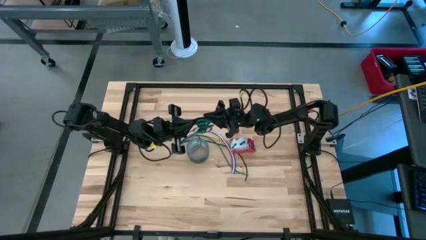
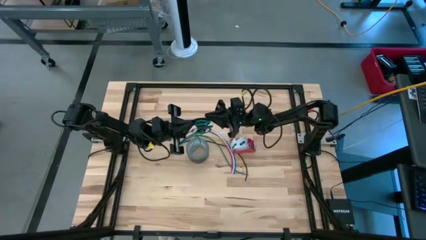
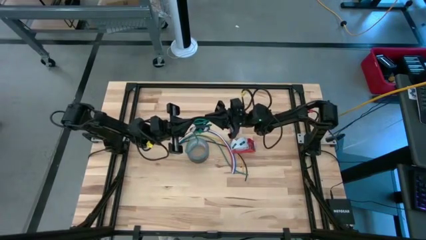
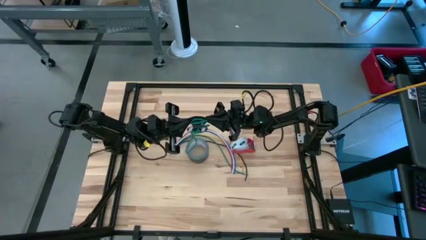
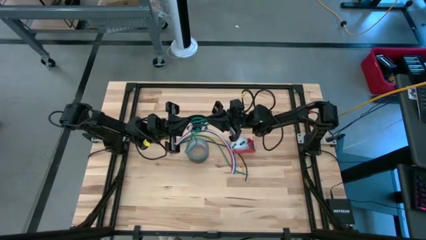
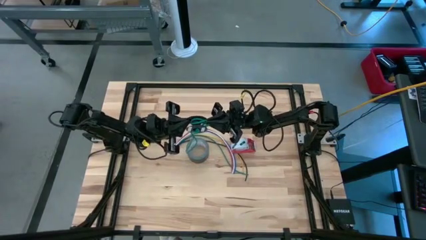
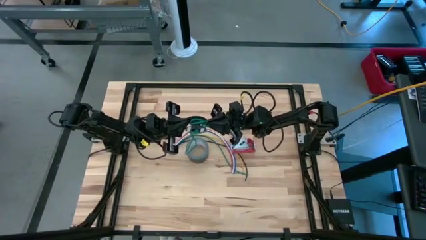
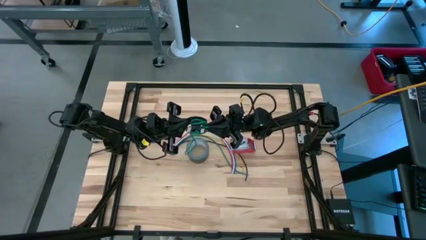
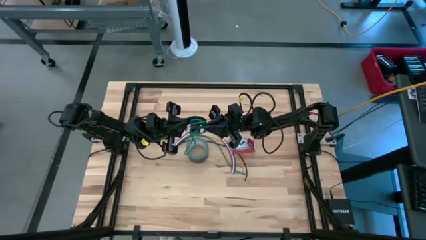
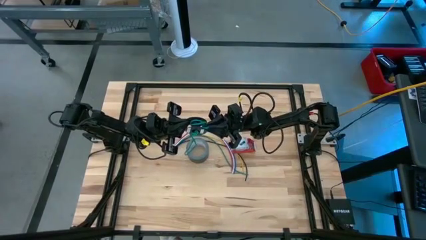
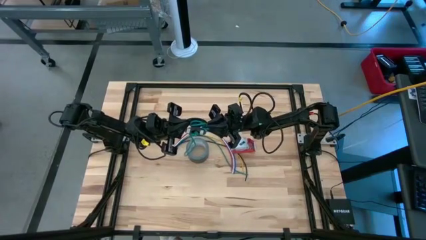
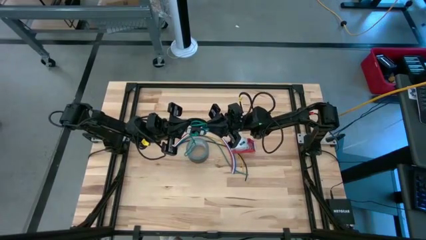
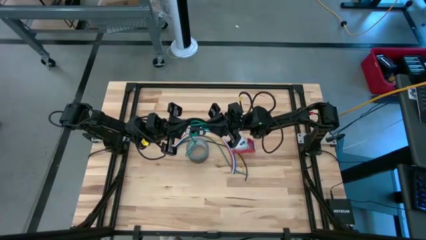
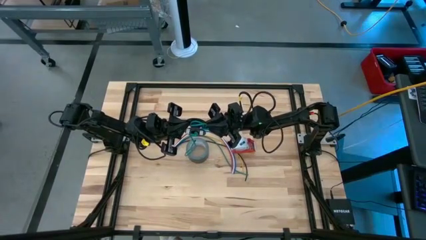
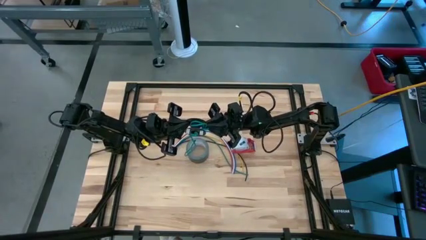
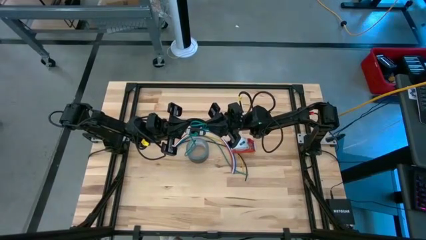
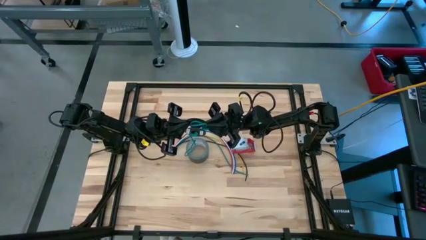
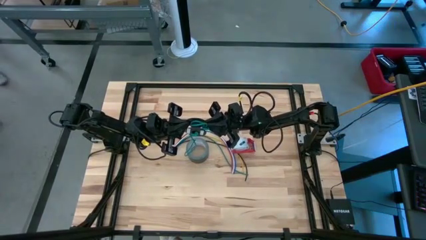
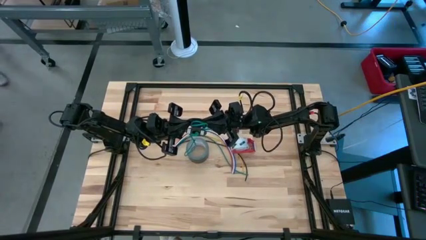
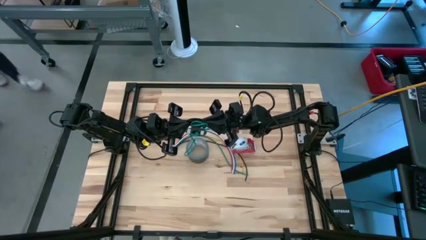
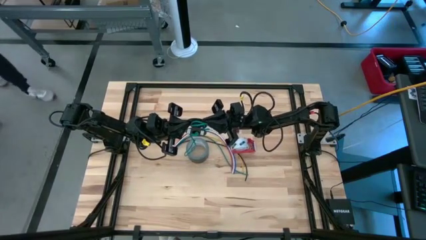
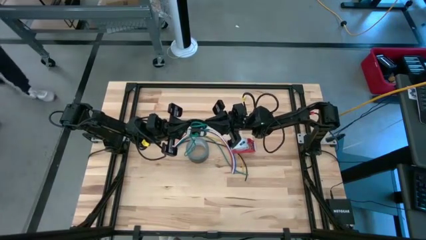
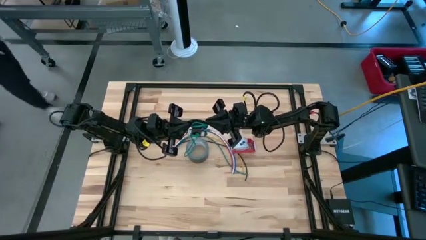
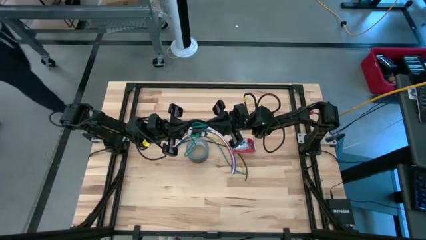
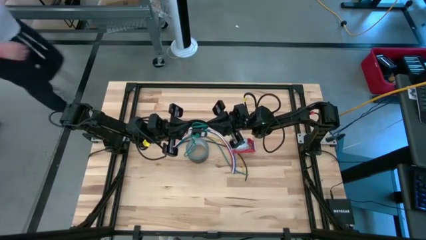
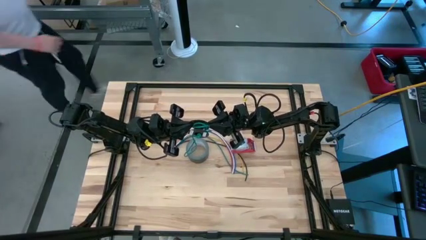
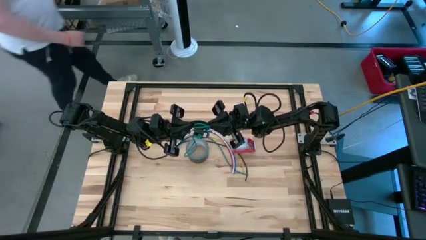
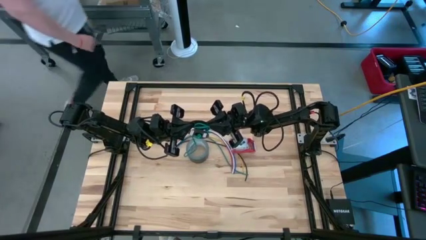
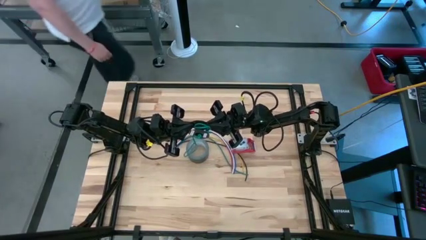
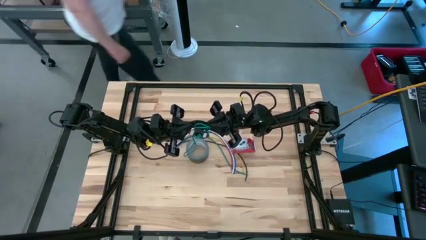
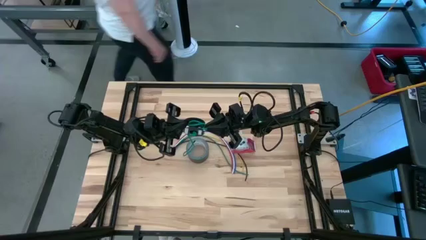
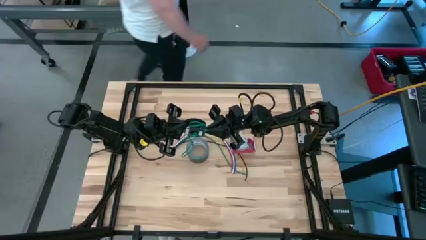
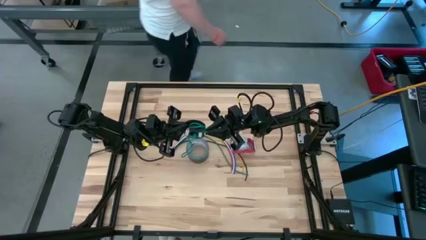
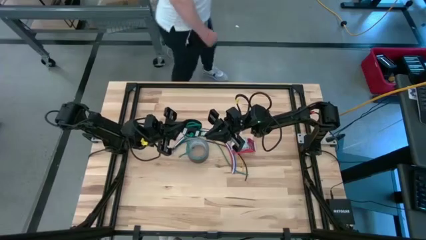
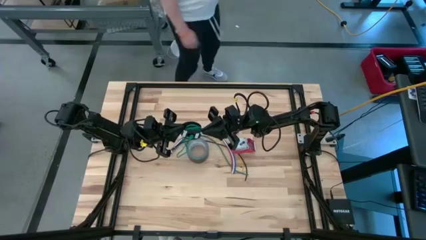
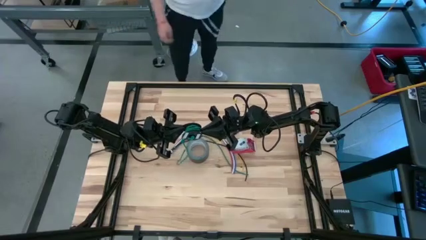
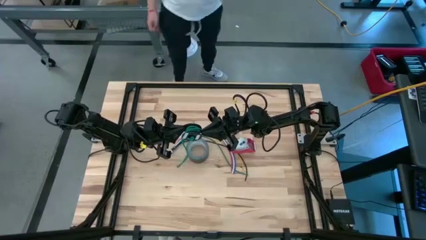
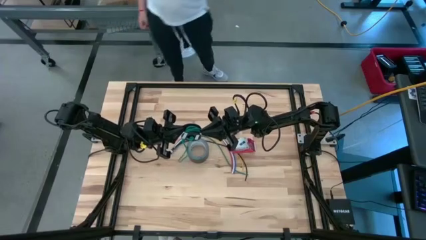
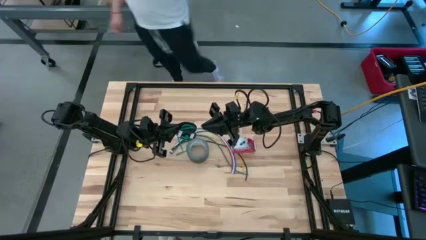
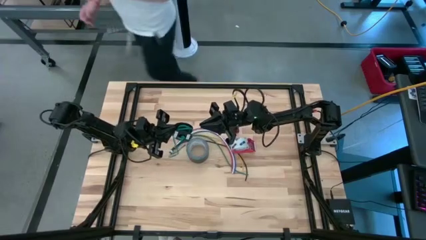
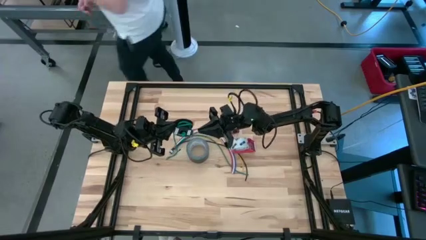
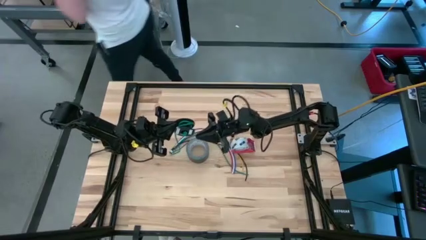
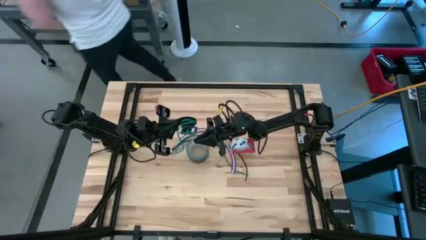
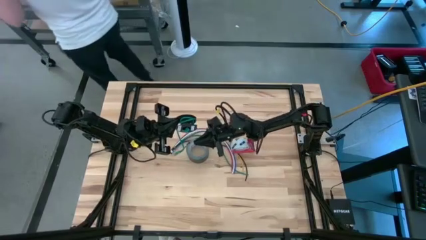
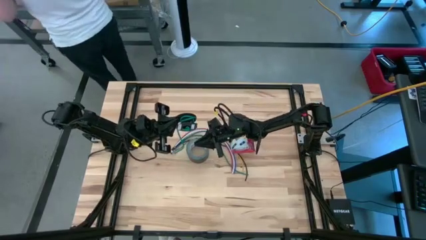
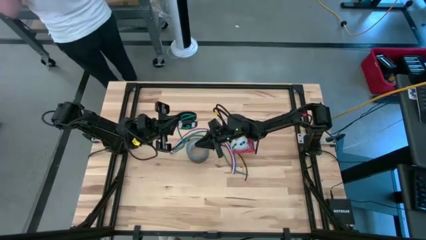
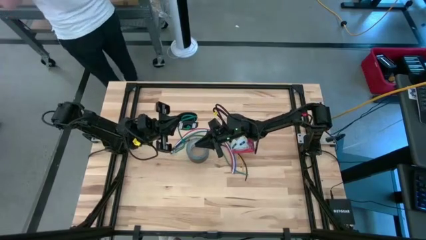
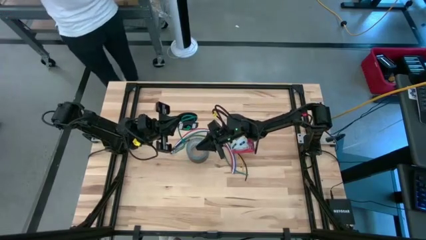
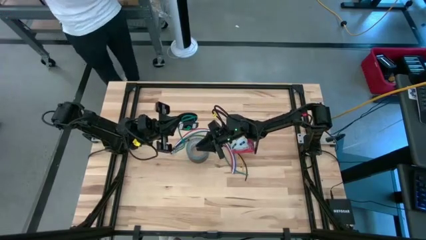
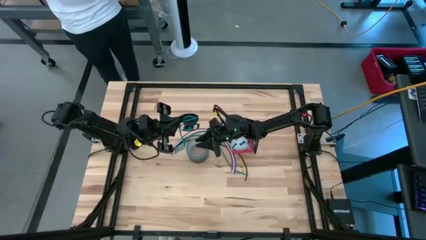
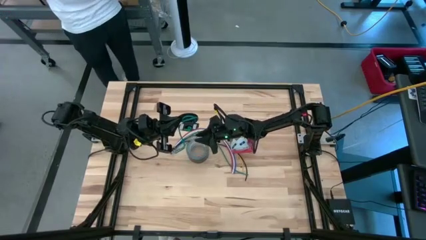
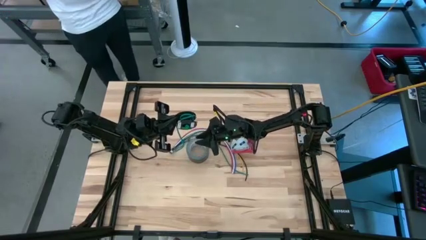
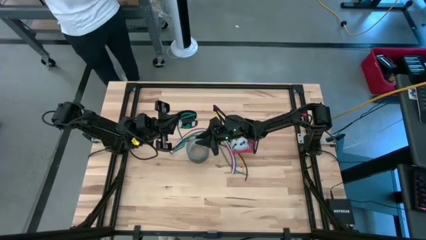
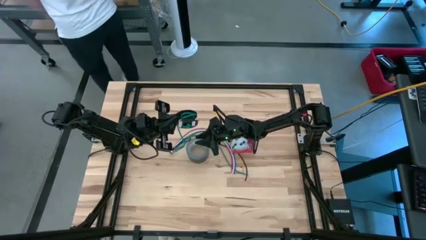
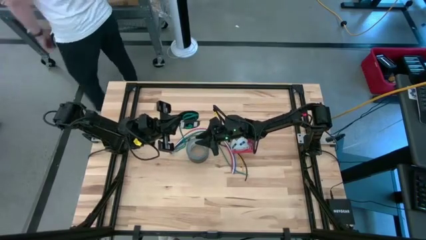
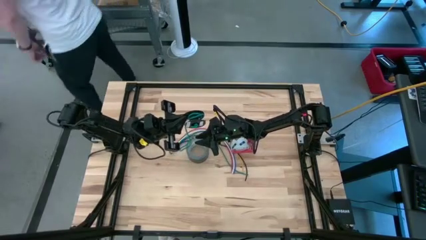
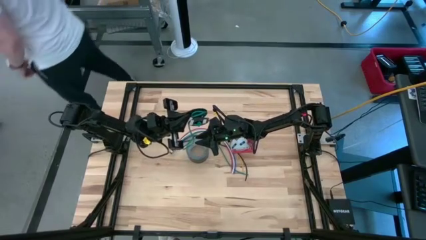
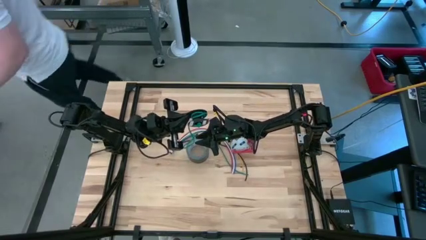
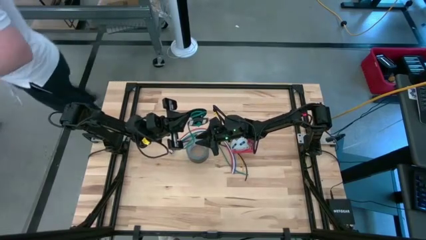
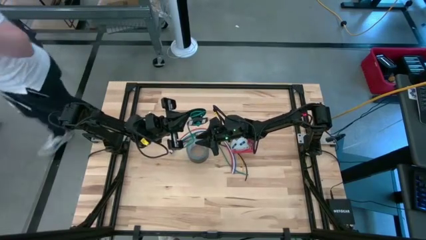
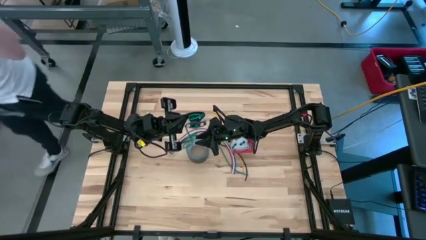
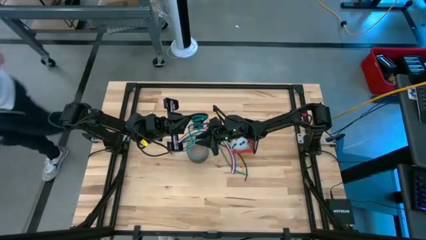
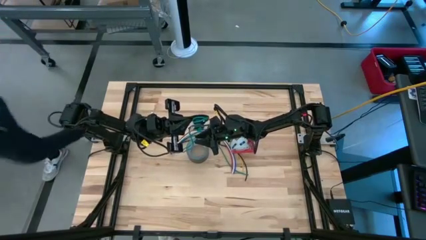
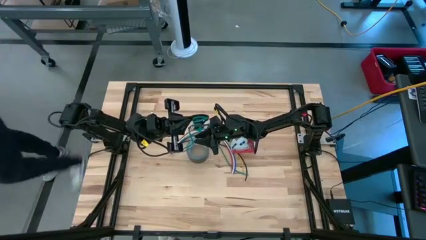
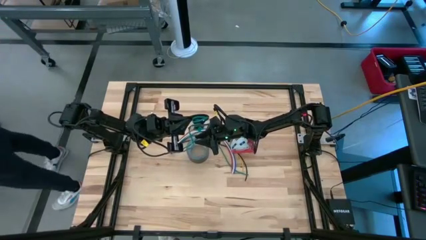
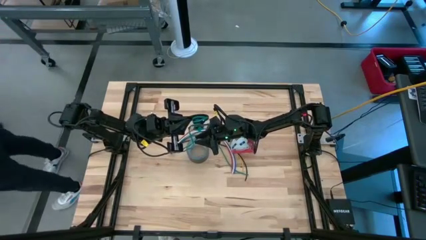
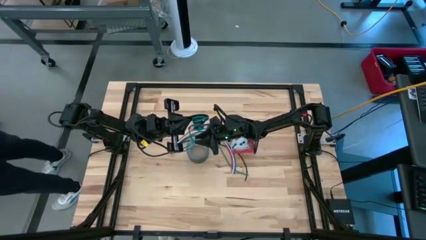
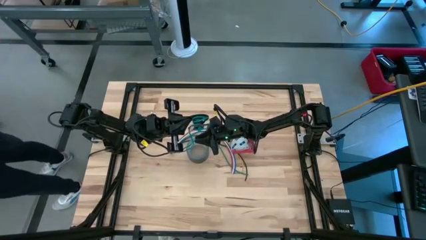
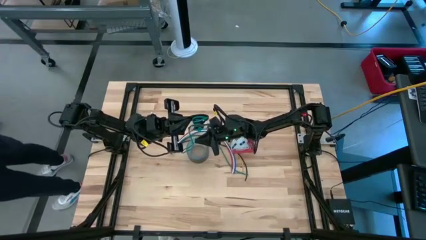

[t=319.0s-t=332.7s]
Task: Coil cords
Coil the green wire onto the black spool
